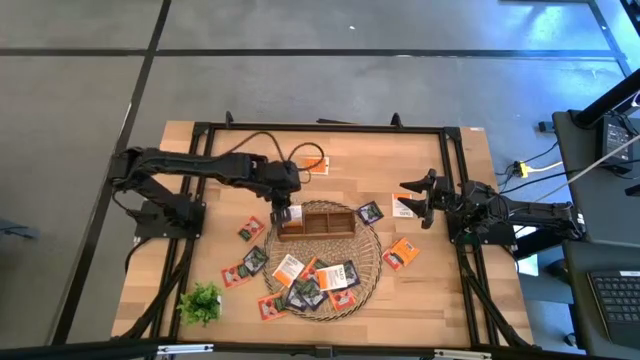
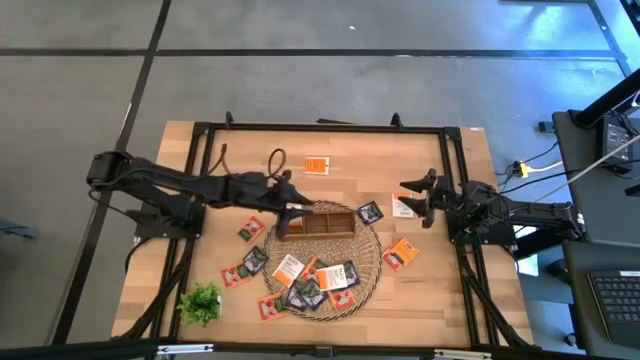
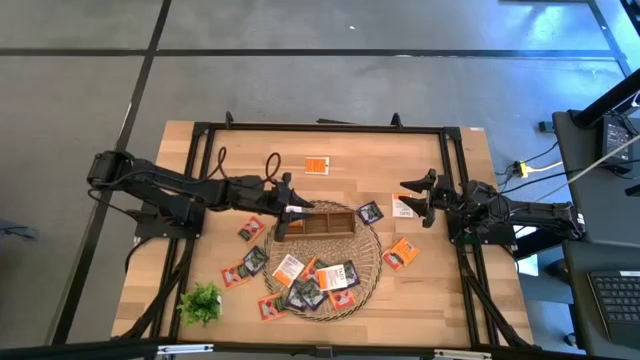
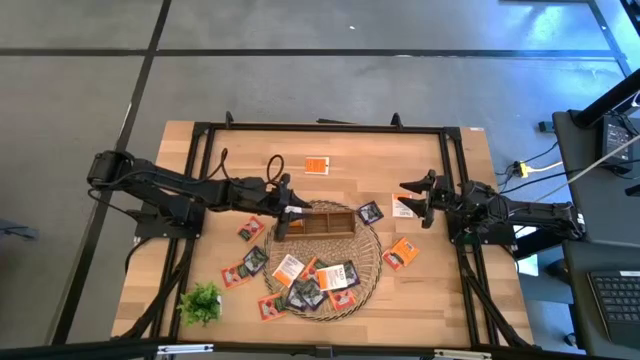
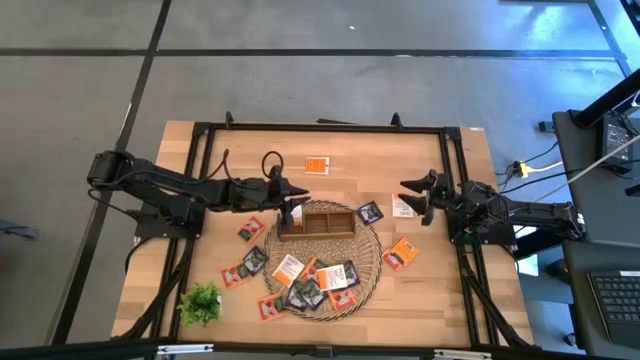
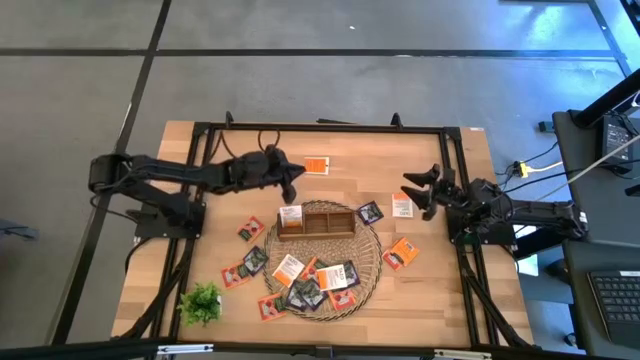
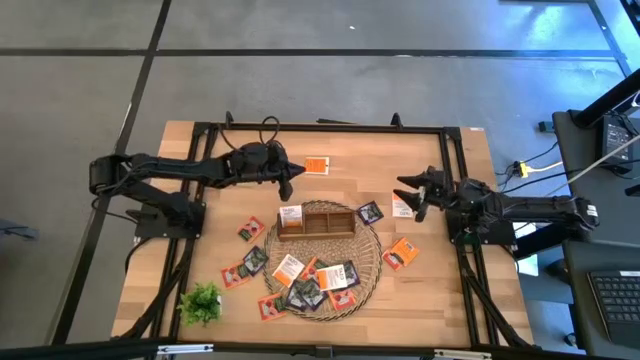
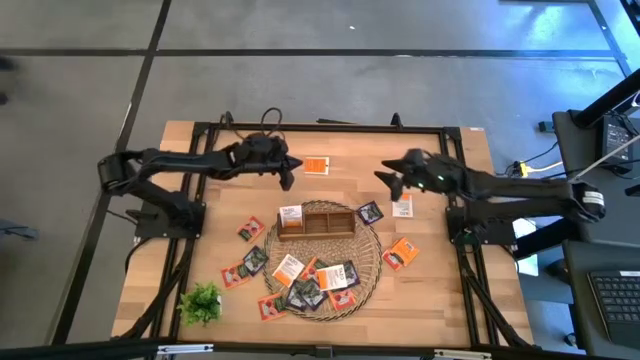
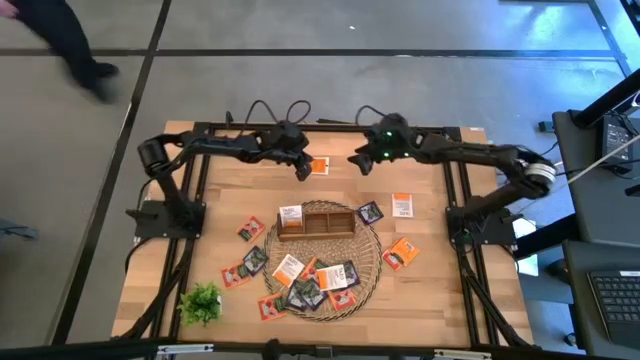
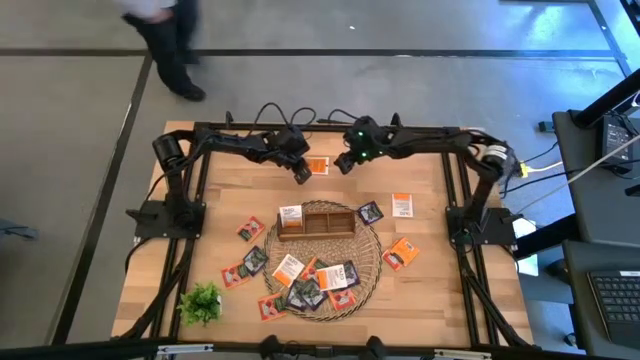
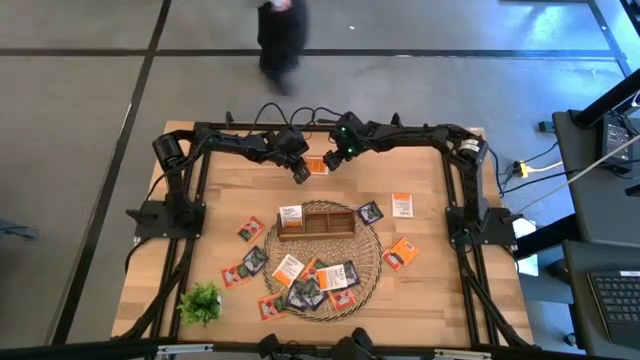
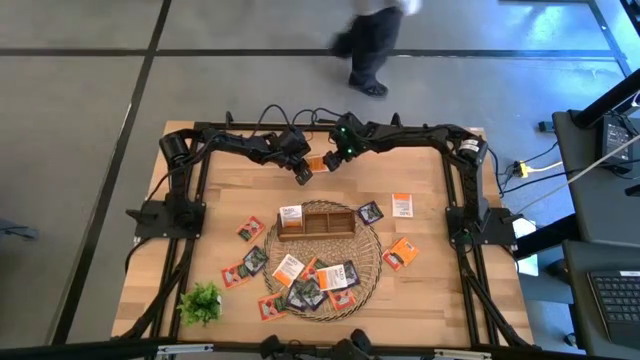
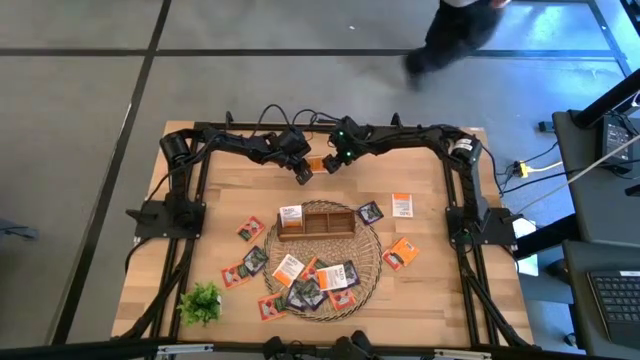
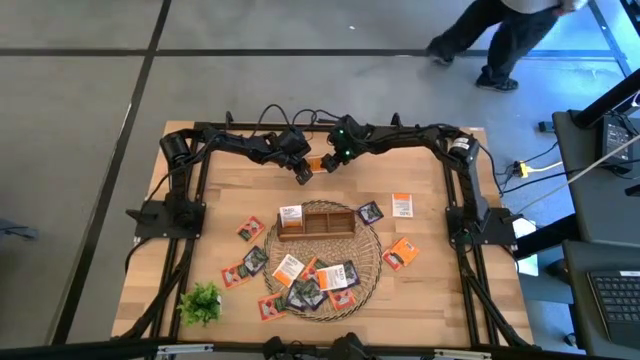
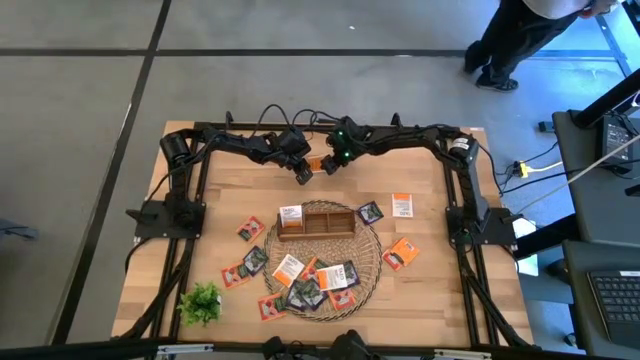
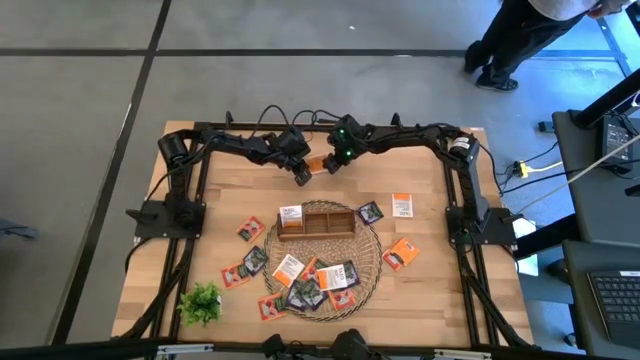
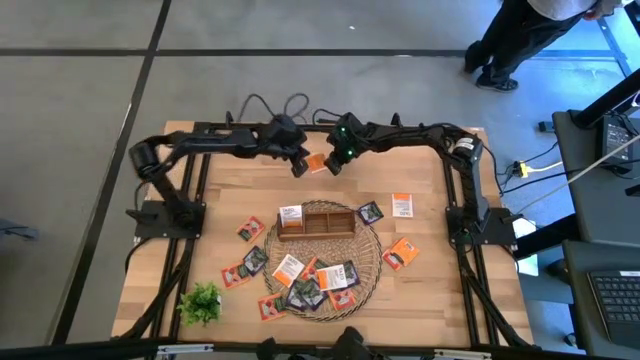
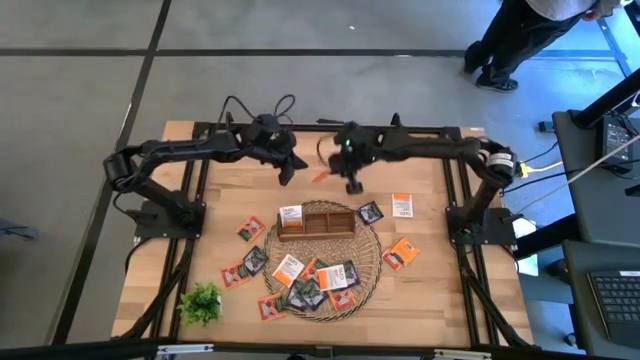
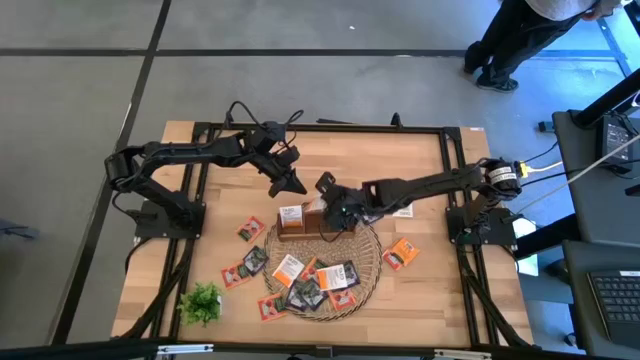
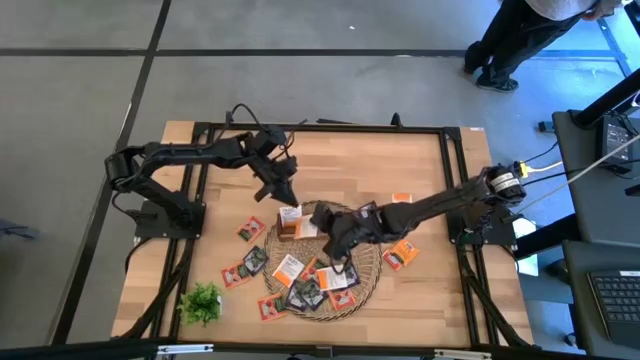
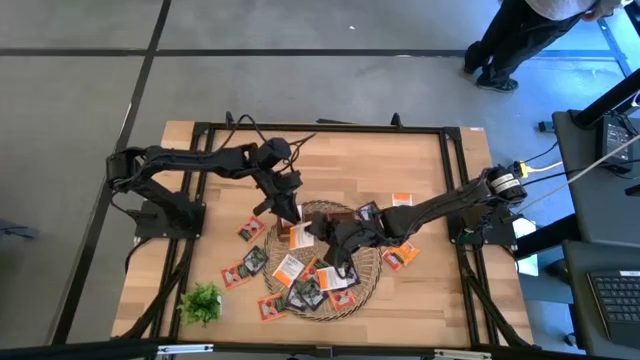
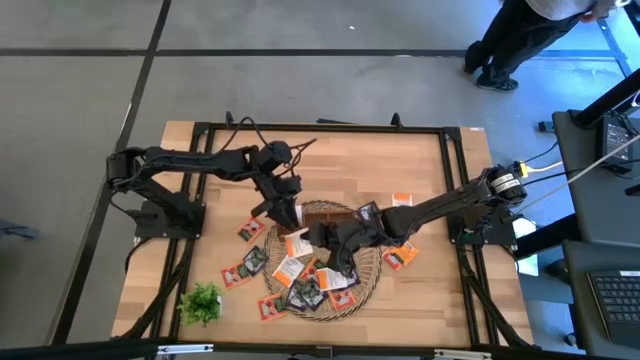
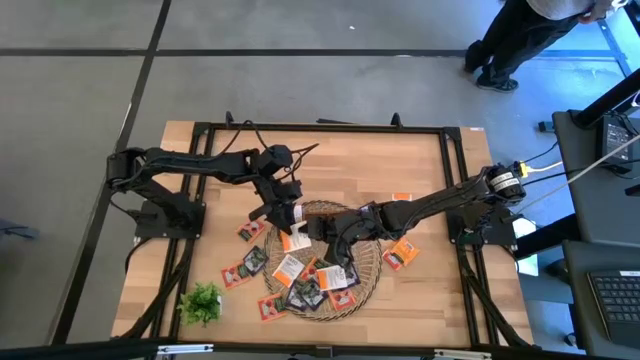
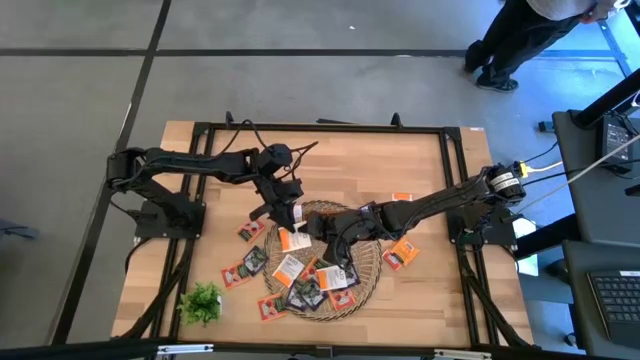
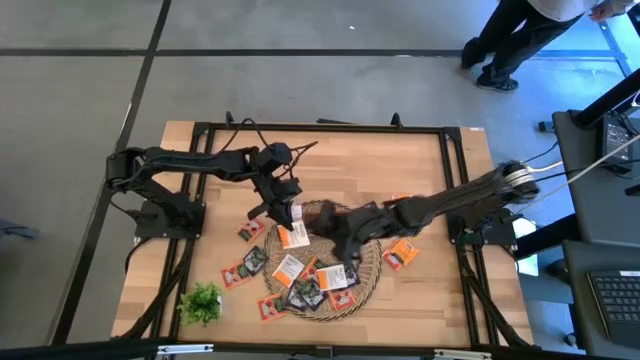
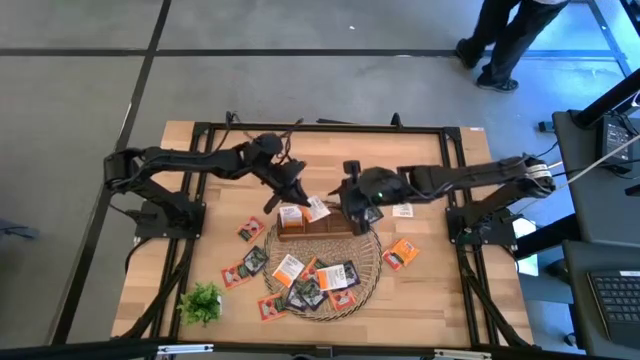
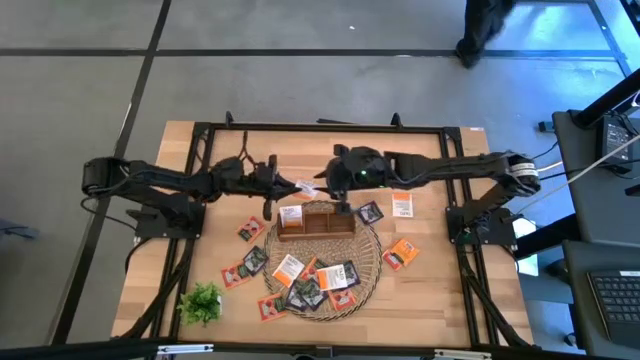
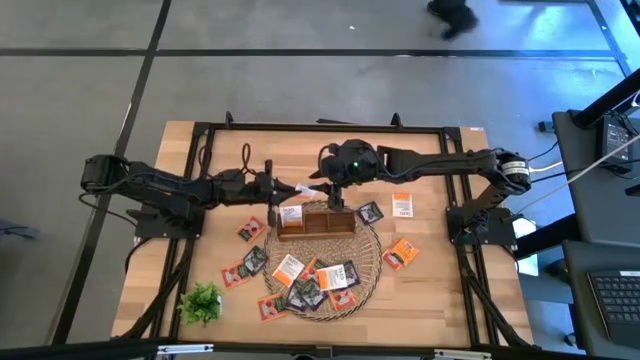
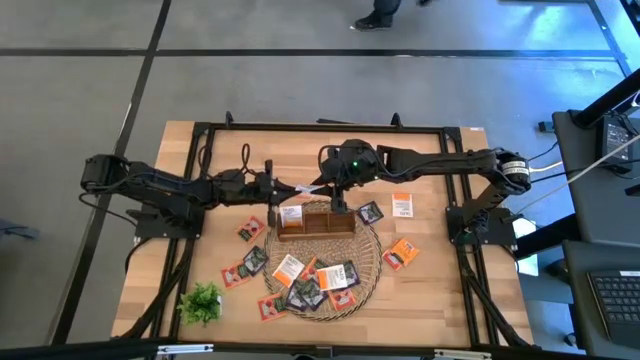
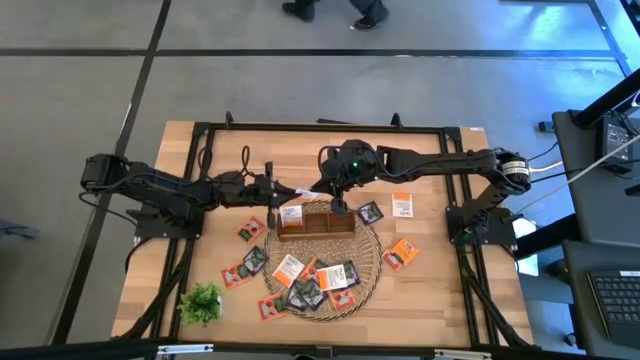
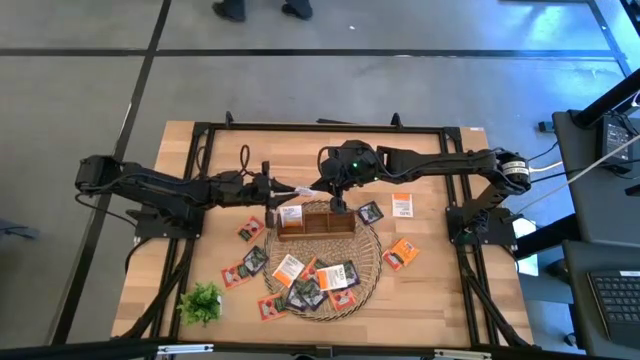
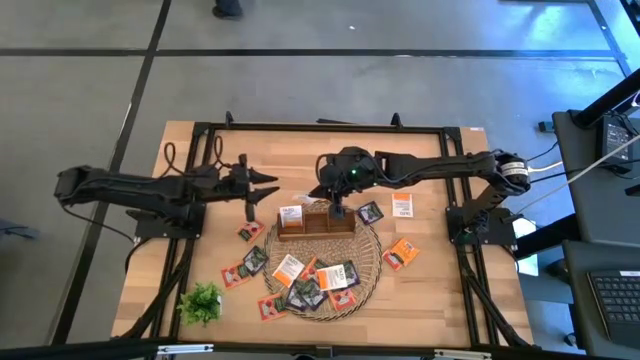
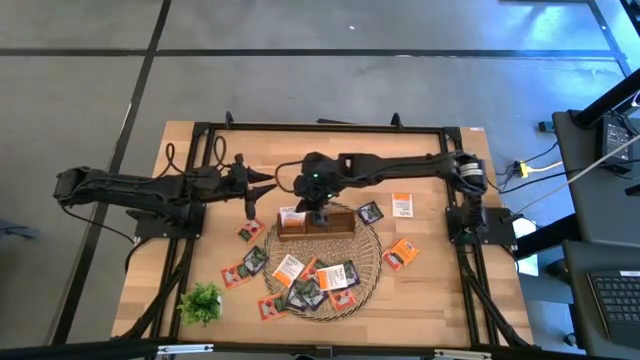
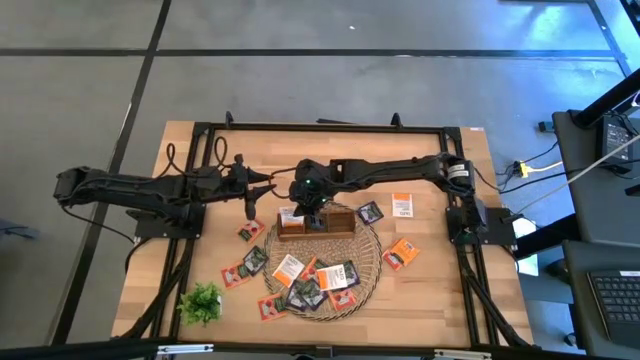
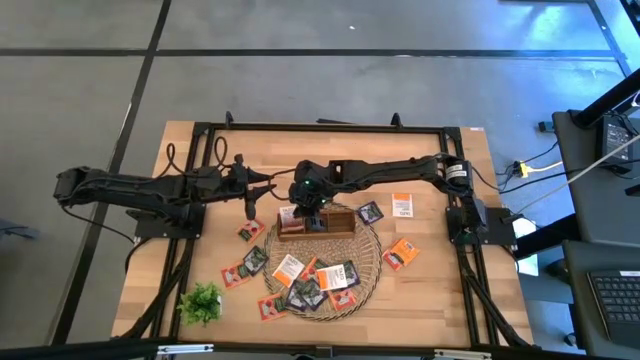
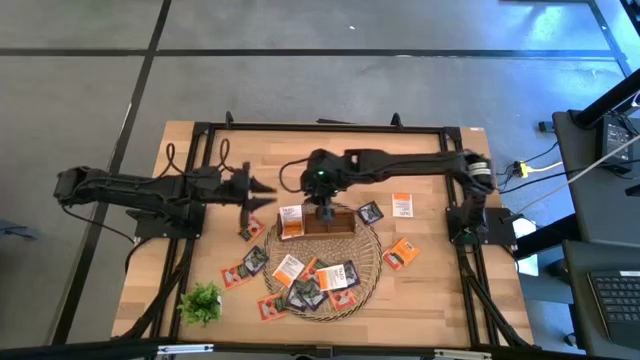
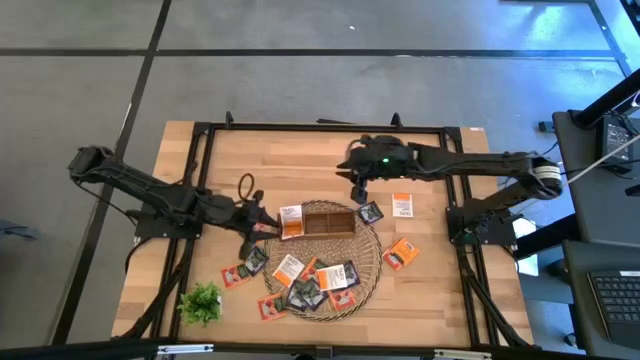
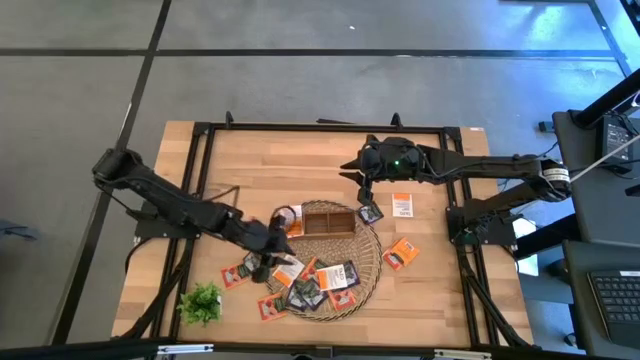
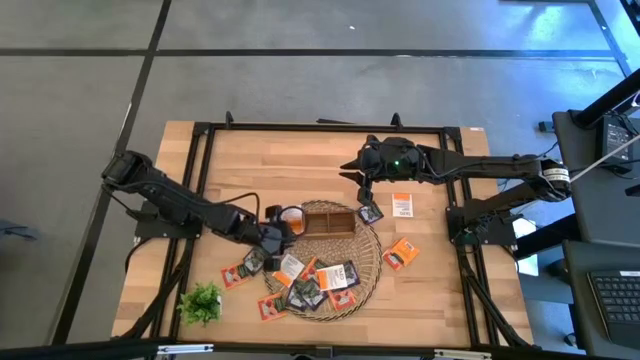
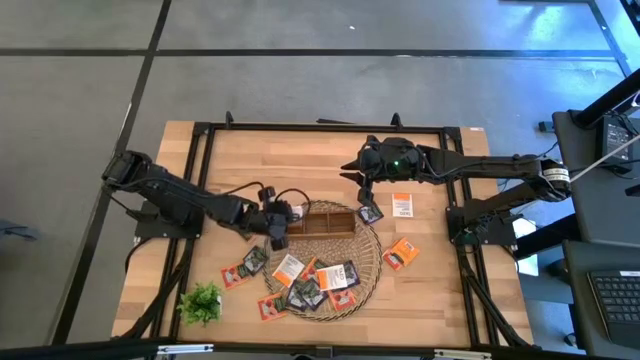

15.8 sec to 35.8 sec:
Task: Pick & Place Tea
Put the white tea bag into the left slot of the wooden organizer
